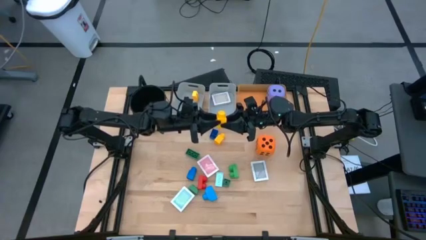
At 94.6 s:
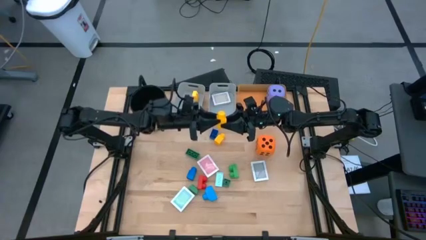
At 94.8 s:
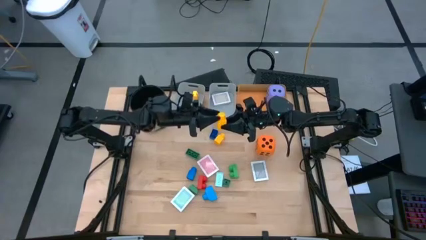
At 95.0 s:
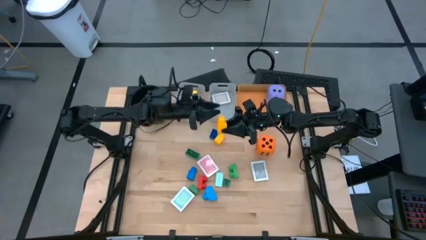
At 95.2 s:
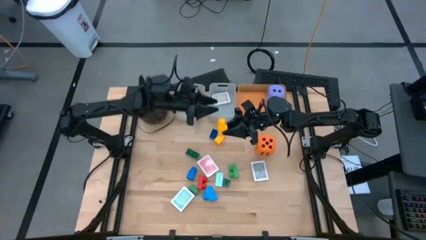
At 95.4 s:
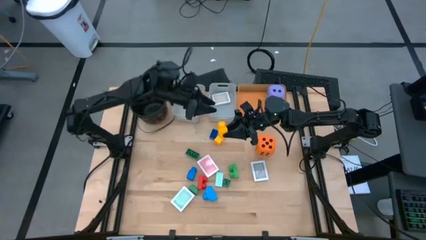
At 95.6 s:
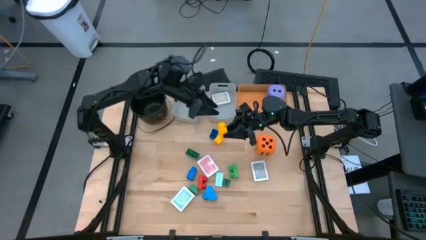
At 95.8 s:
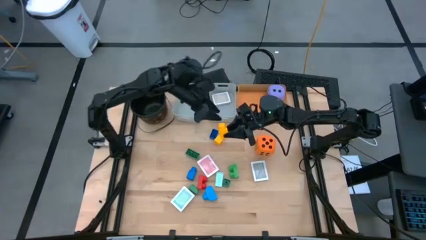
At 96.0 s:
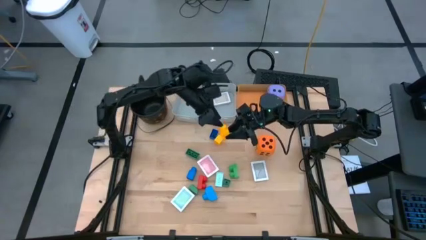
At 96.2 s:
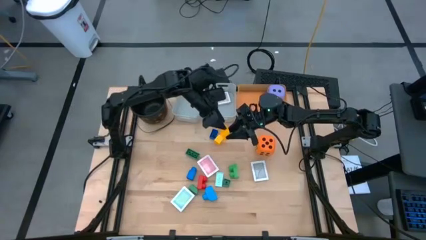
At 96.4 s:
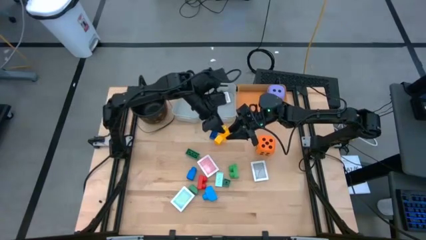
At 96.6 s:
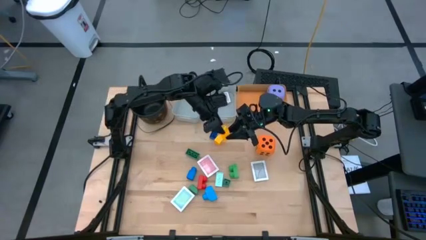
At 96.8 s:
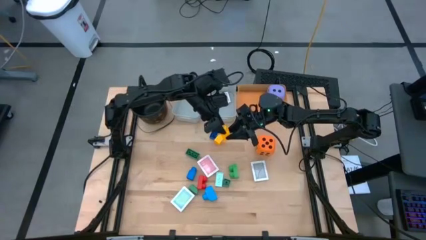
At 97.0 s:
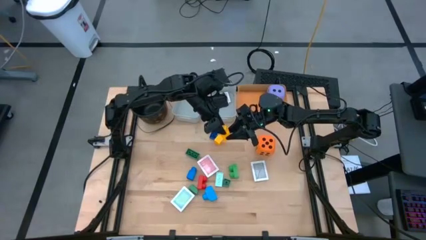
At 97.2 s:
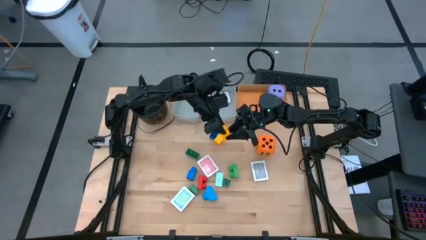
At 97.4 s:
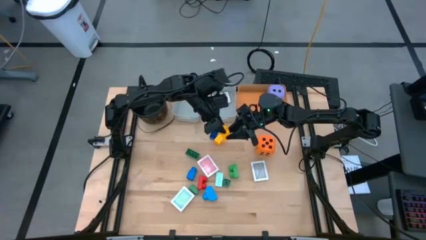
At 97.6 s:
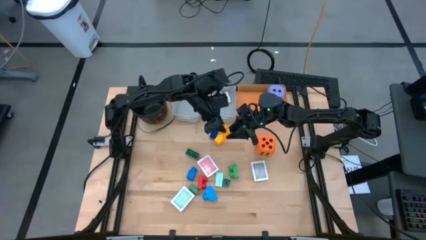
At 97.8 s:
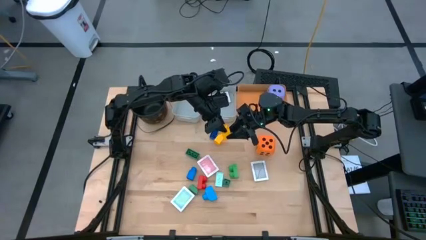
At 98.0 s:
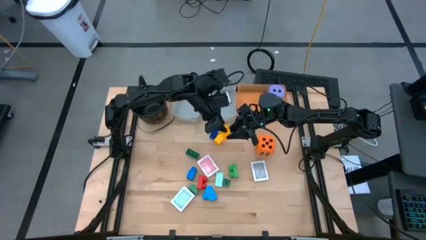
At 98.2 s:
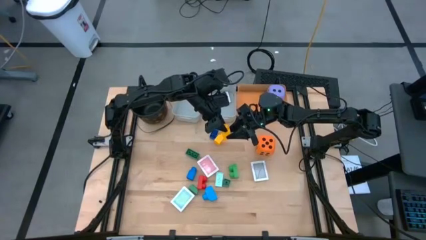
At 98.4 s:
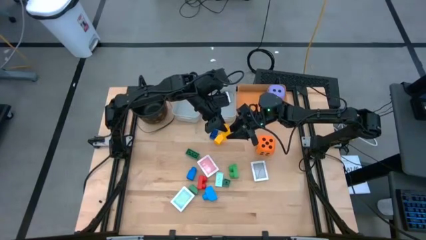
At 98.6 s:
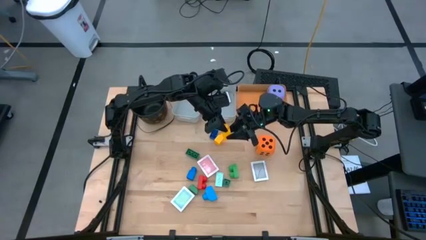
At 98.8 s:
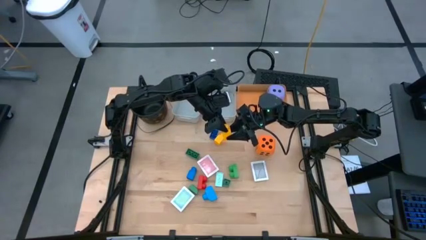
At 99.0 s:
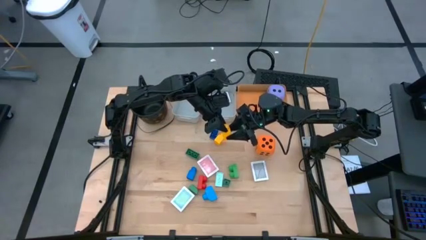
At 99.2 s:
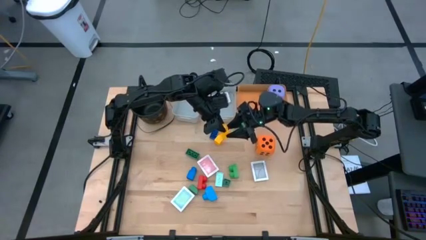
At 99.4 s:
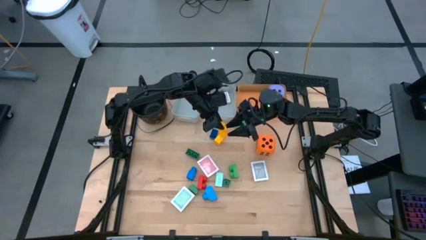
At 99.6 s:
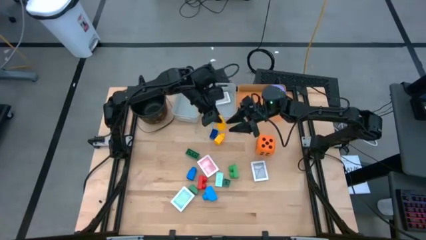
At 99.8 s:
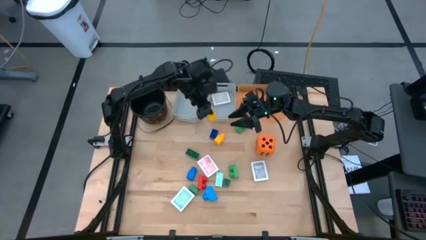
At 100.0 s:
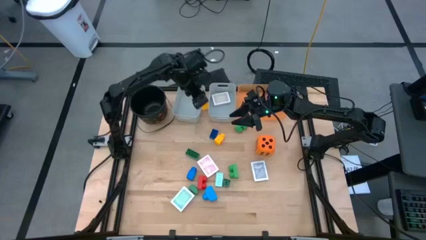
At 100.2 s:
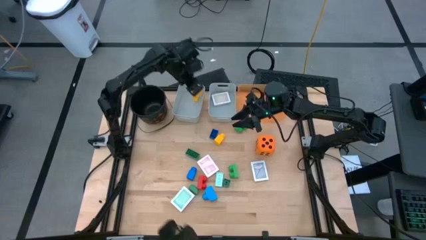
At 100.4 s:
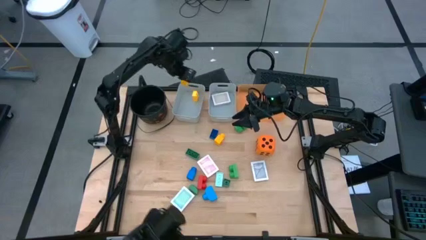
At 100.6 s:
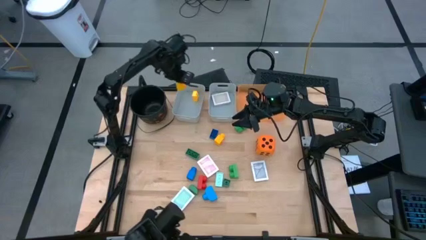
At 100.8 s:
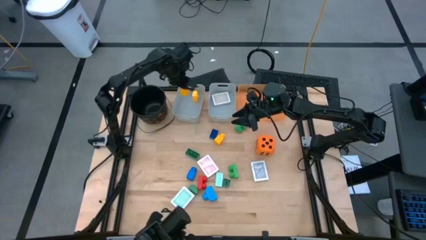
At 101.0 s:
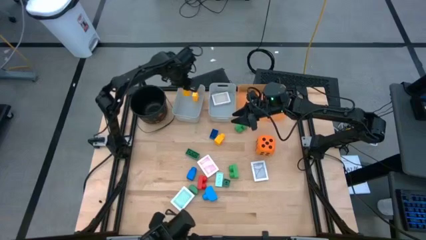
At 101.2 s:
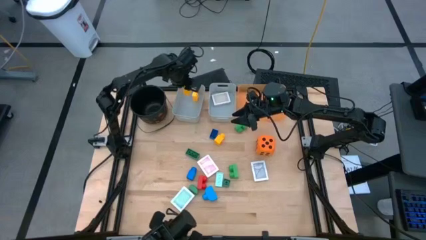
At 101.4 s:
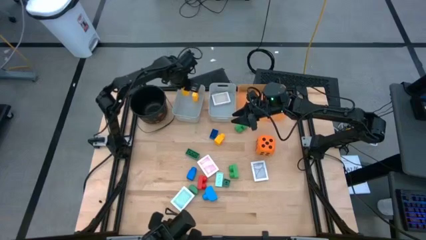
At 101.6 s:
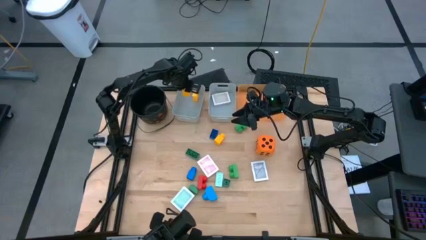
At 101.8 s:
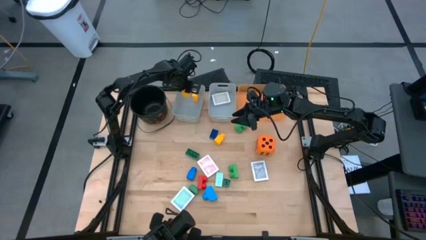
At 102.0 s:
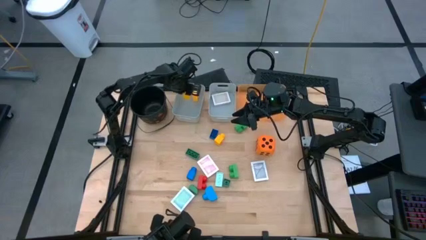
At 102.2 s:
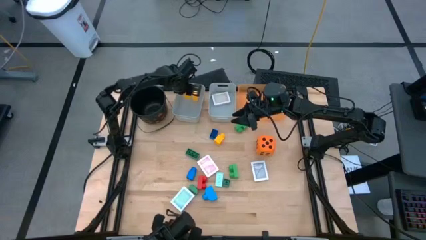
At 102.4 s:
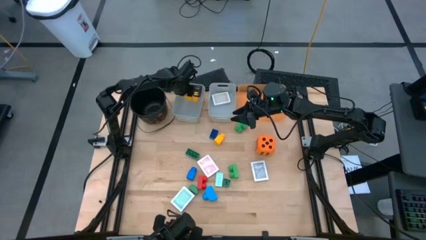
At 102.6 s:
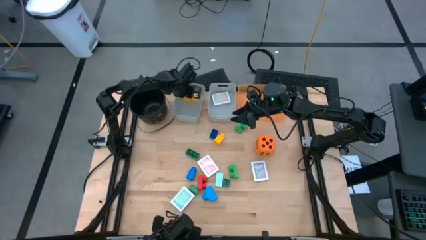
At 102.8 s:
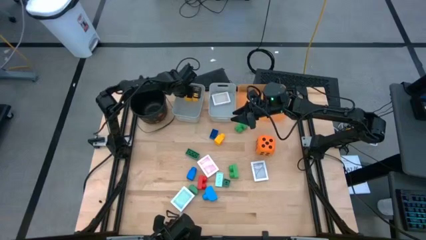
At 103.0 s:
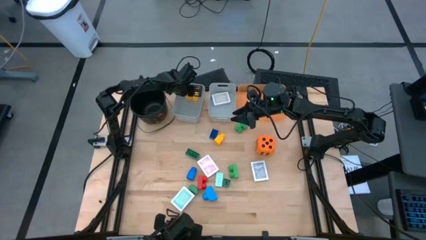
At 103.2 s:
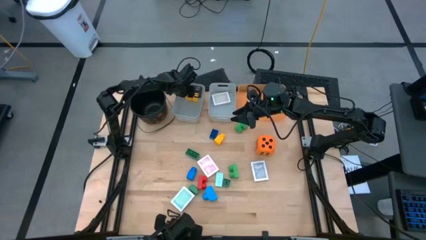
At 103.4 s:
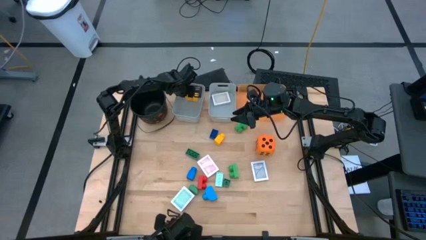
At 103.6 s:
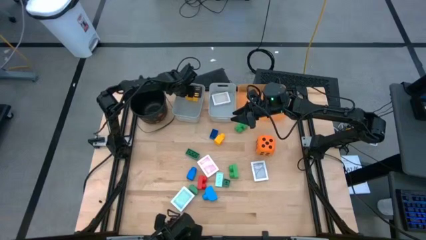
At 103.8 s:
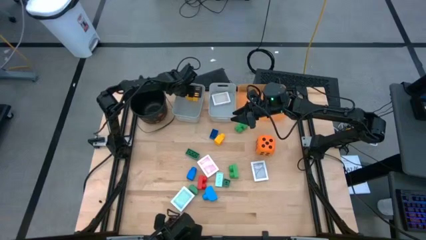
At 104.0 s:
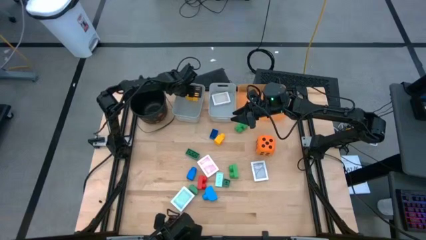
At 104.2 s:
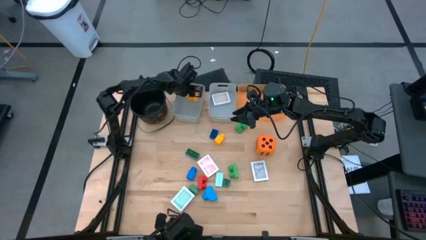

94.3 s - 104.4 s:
Task: Pick & Place Toys
Put the yellow game piece into the left gray bin
